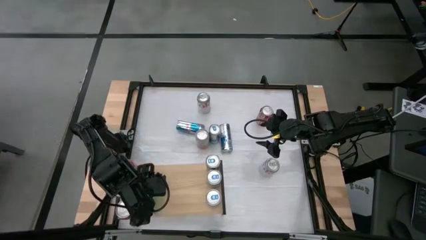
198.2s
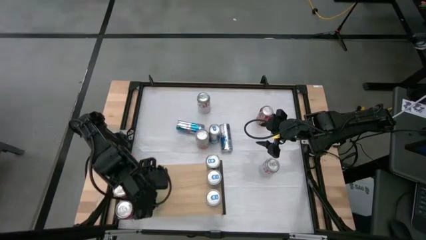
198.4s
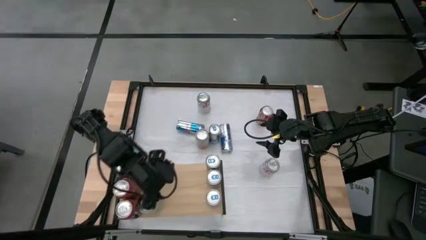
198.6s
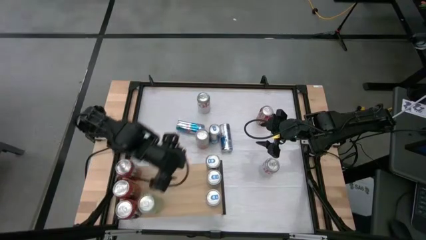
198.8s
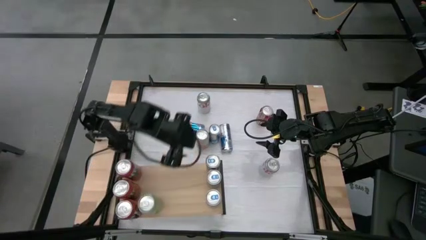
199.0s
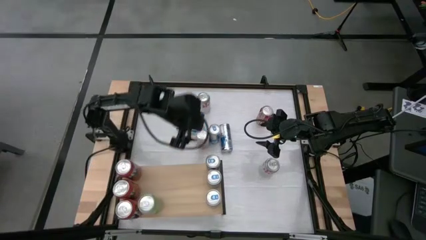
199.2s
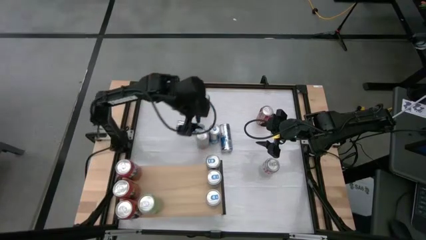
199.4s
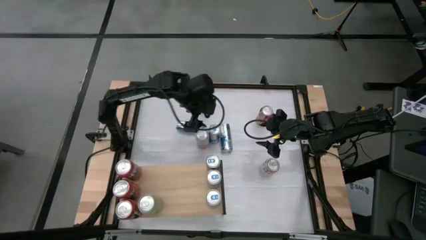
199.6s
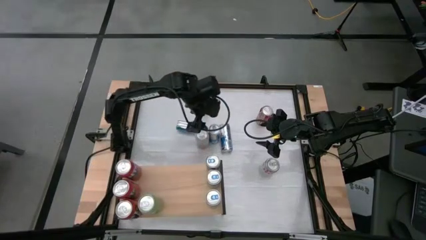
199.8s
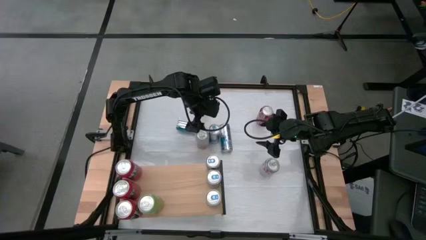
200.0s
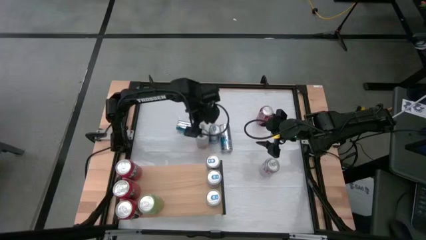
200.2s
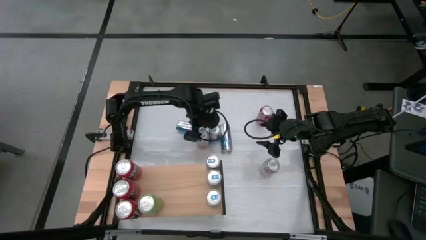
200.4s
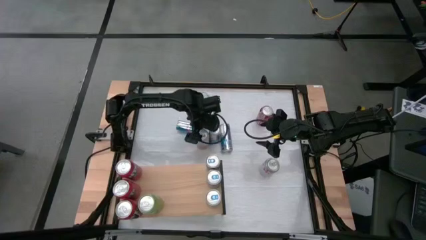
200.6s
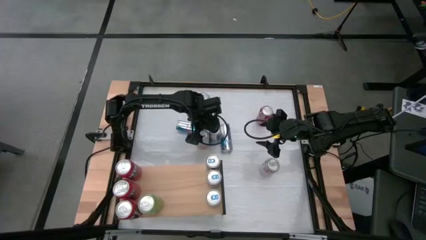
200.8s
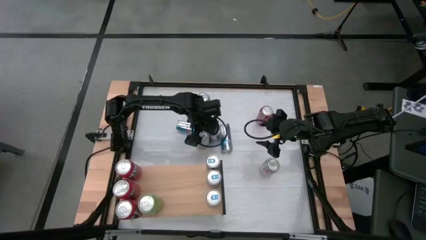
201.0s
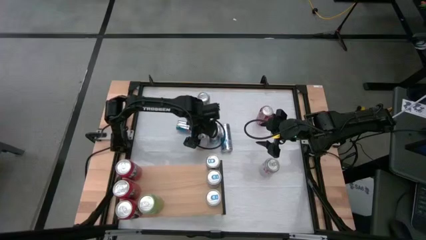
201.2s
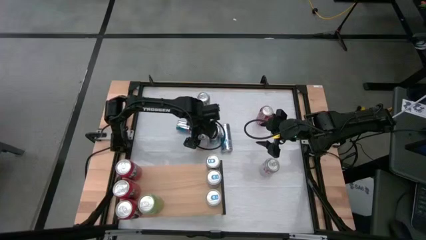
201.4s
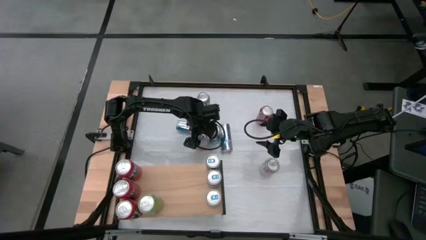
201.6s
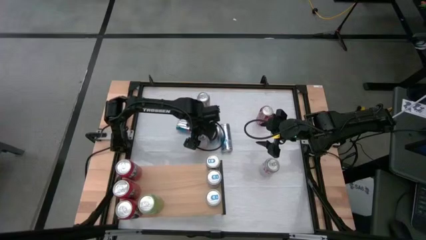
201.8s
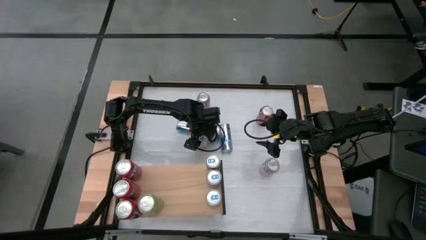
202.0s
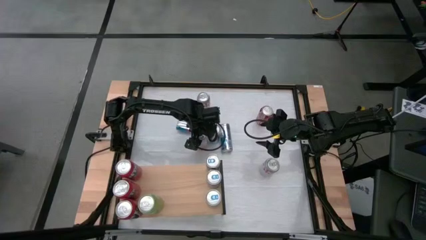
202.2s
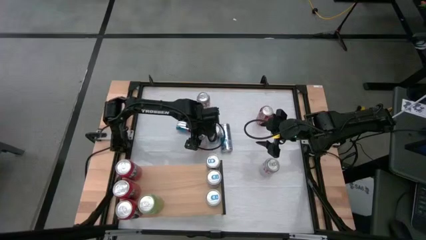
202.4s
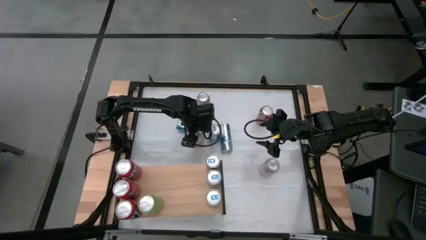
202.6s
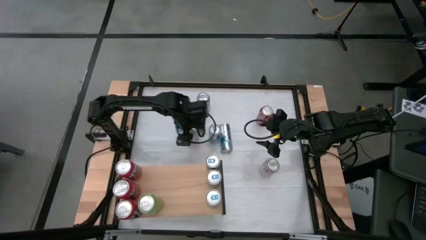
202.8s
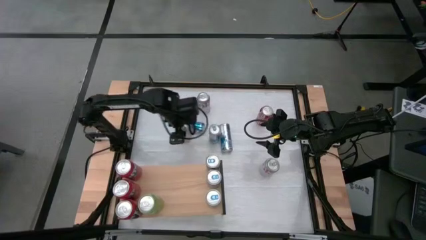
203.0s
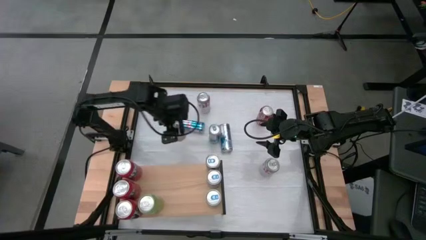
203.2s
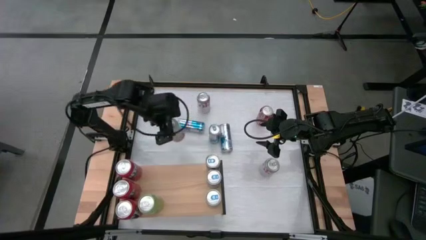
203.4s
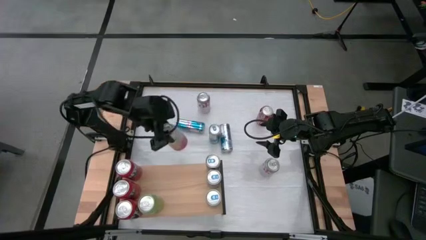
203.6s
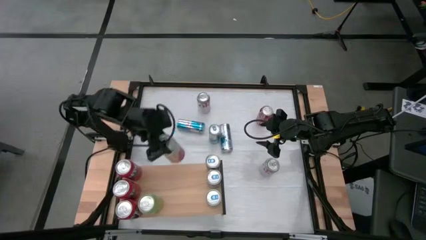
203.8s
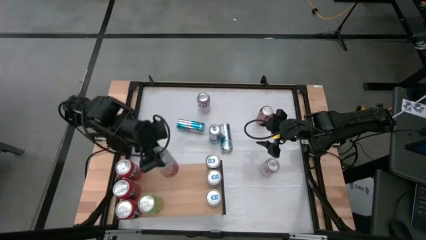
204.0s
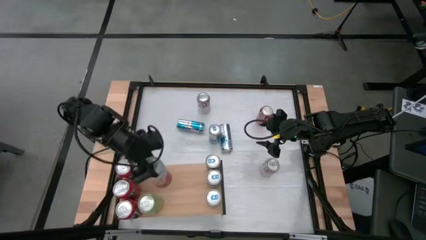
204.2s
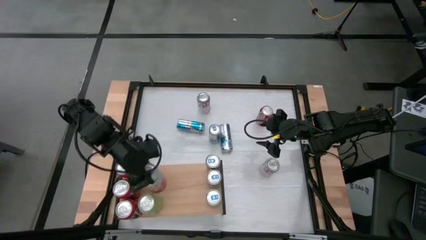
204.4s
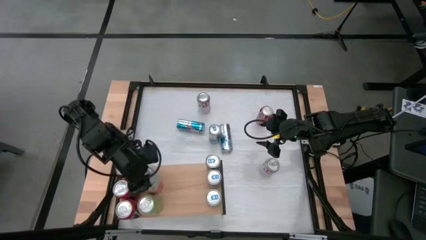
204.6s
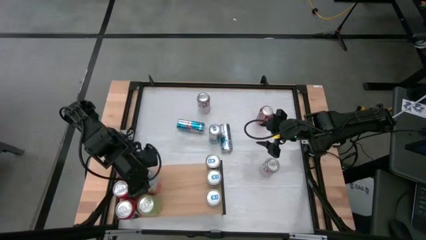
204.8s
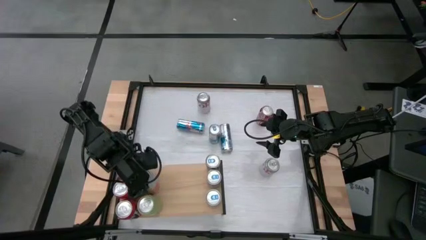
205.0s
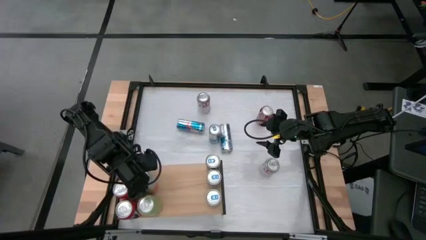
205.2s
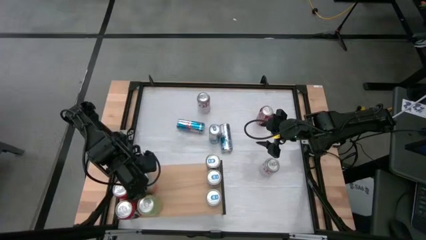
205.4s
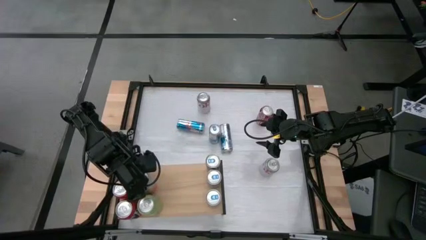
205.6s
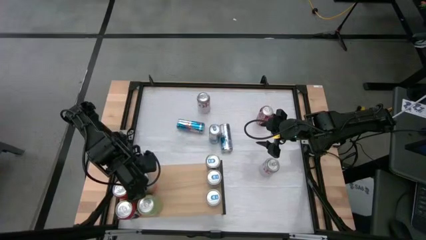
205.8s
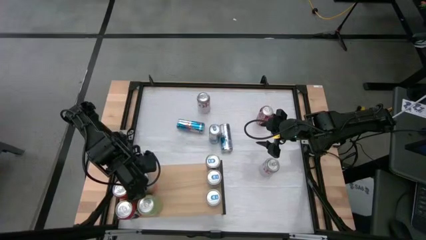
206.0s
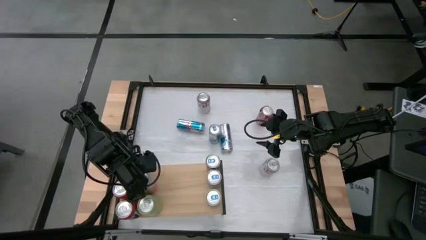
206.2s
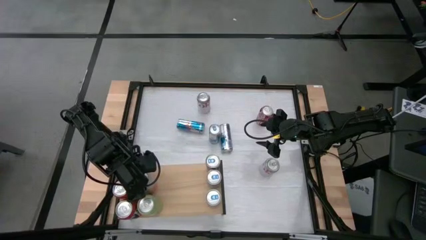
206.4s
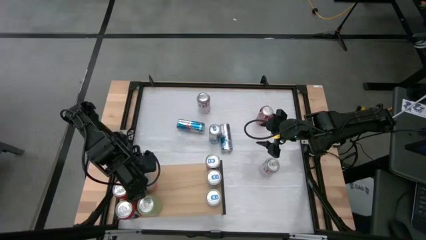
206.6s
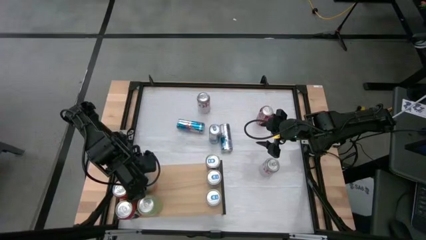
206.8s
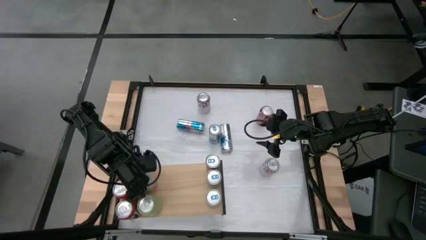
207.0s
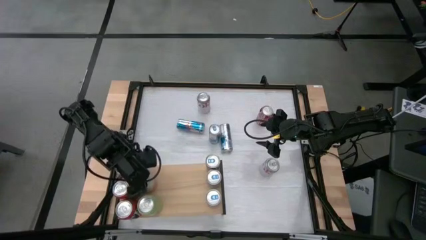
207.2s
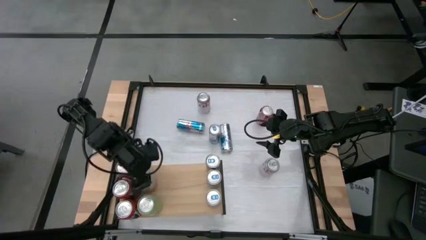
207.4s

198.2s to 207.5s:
Task: Place canned beverage on shelf
Put the white soda can on the shelf aligned with the green soda can

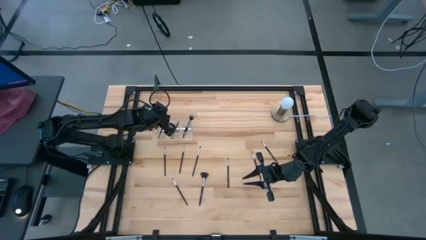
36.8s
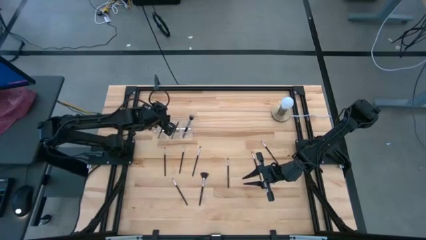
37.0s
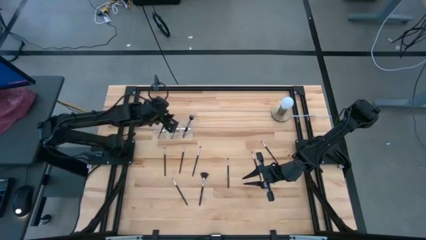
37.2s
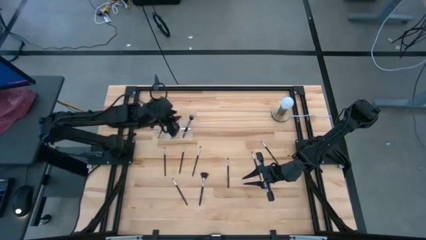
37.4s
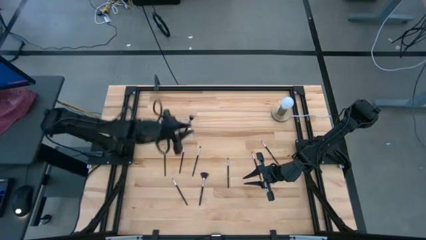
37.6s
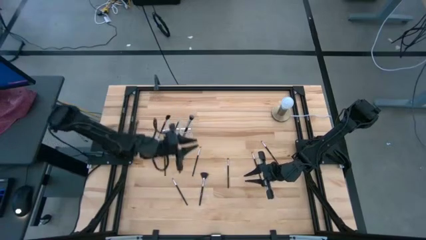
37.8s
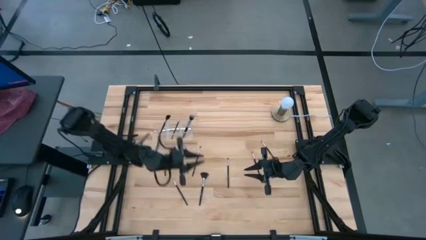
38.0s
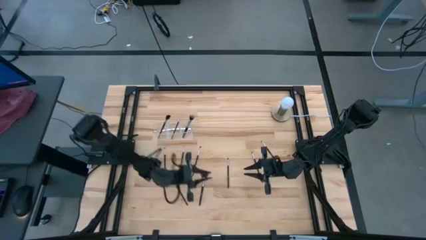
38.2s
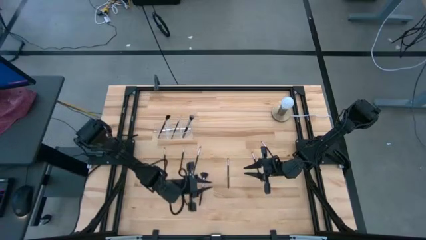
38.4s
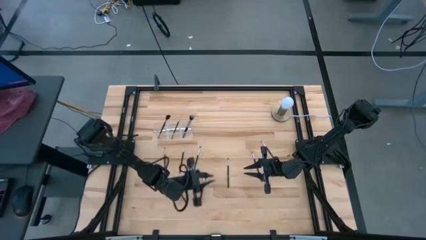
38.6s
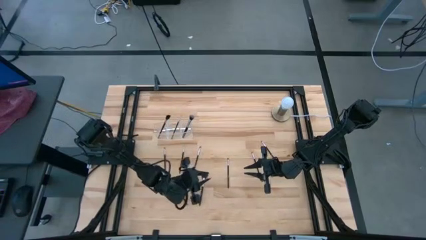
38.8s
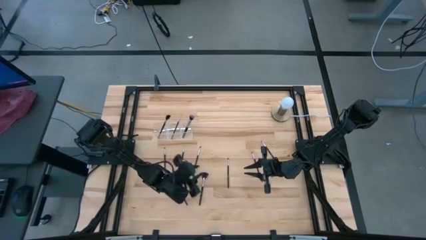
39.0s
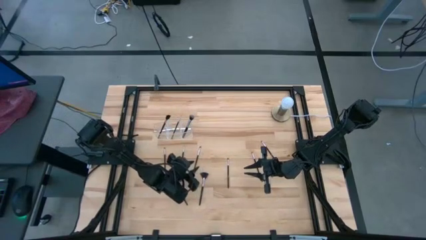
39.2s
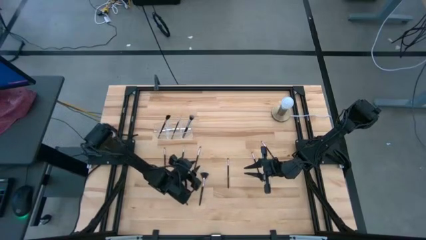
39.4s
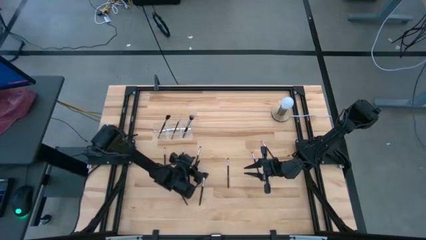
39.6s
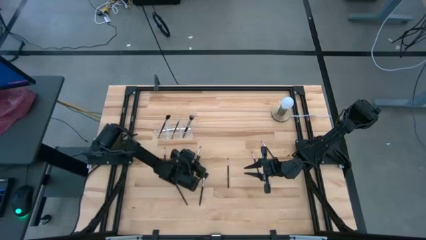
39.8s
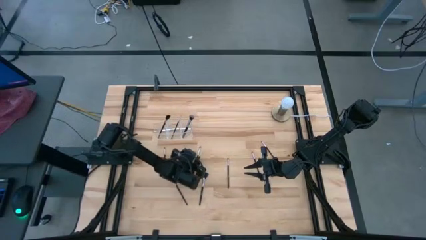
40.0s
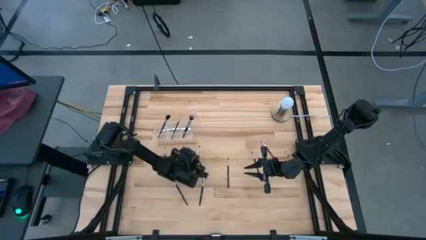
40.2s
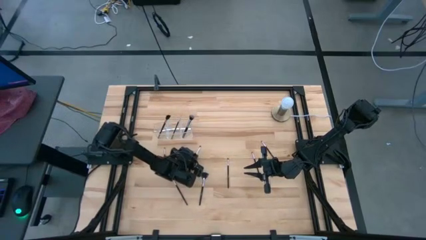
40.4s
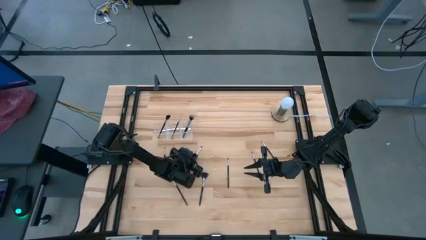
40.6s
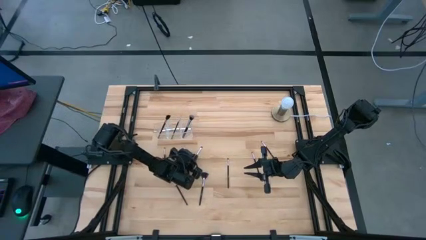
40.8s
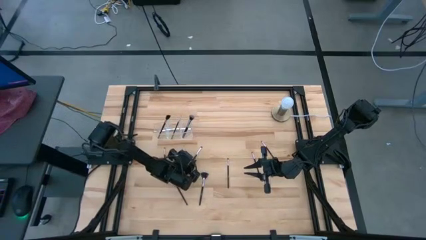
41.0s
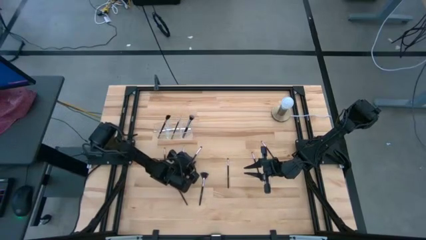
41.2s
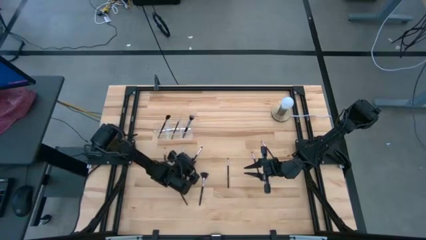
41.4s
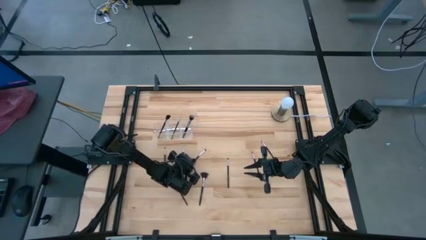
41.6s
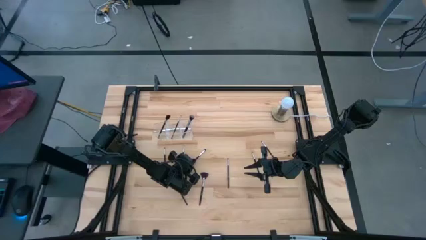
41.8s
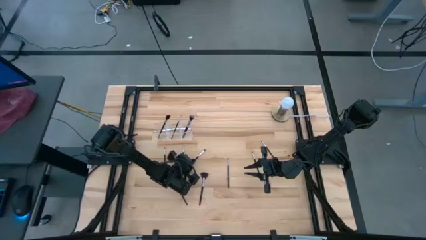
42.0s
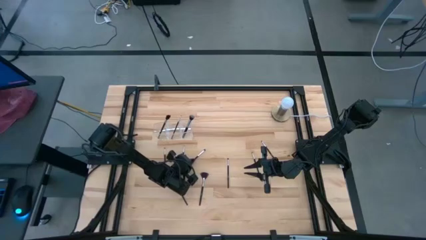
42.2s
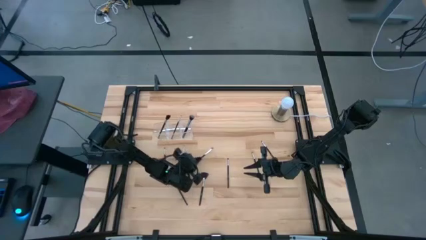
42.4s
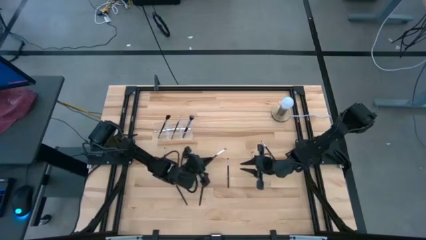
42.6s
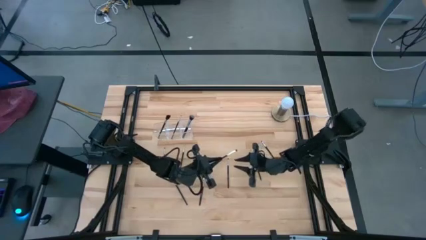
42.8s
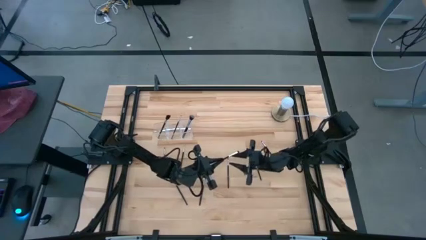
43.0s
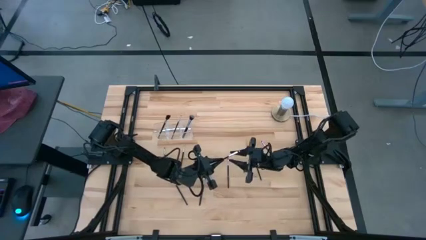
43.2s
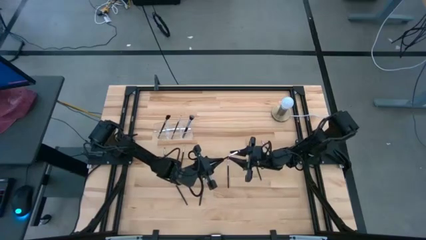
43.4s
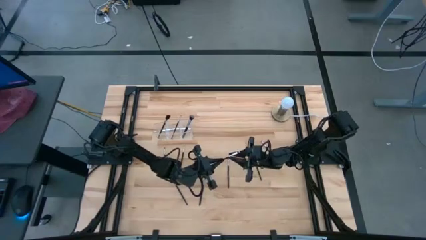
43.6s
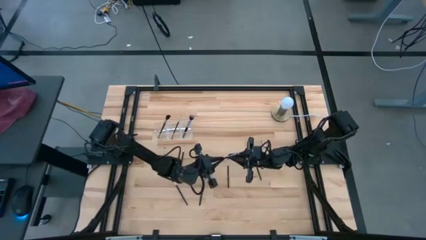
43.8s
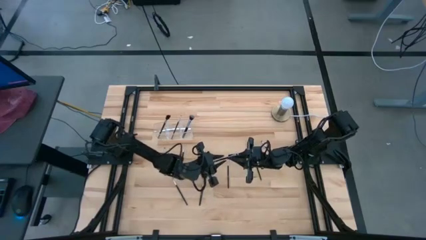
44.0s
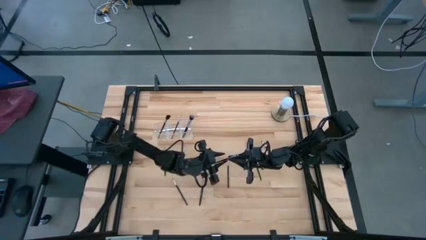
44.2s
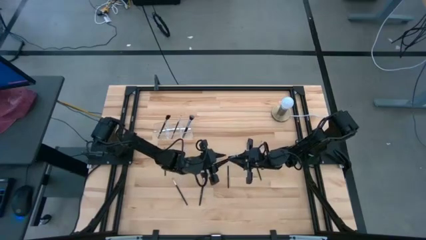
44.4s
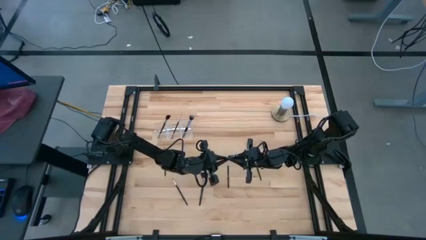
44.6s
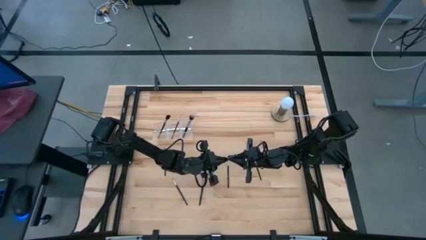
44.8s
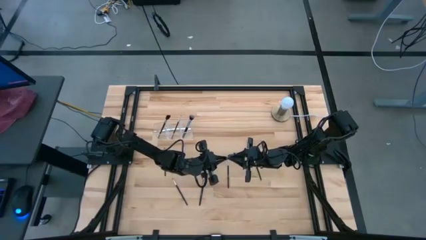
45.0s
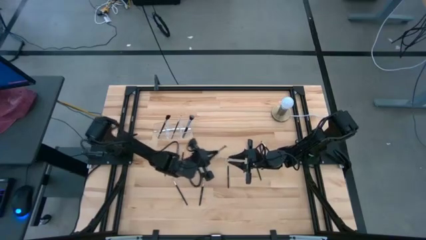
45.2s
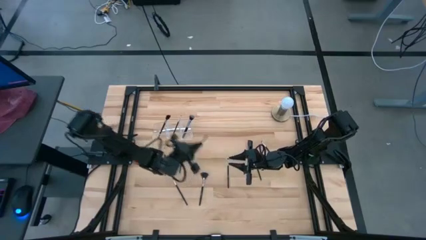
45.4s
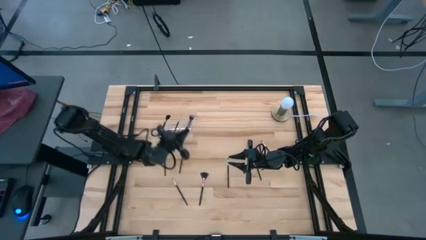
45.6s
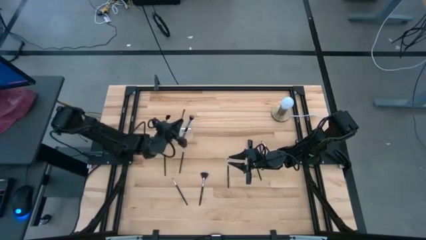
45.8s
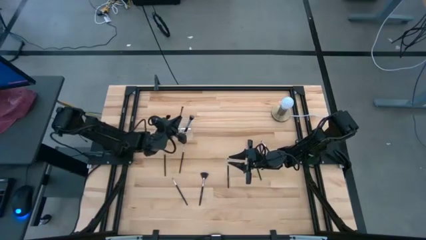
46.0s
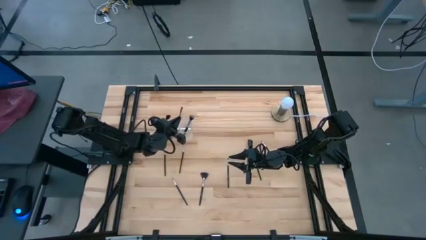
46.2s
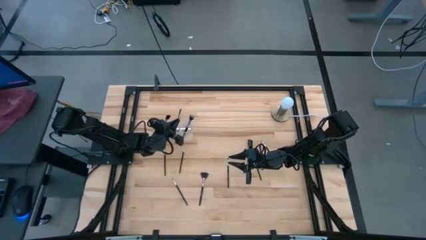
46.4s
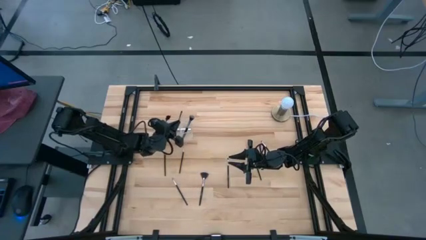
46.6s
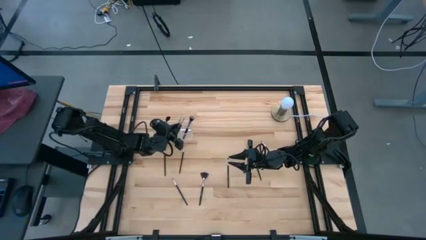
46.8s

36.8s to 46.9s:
Task: Pick & Place Makeup Brushes
Put the black eyeshadow brush into the transparent organizer
